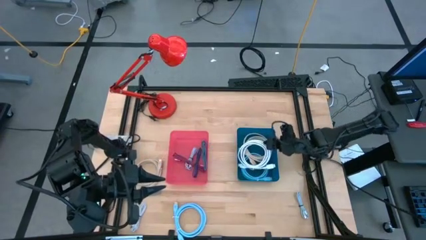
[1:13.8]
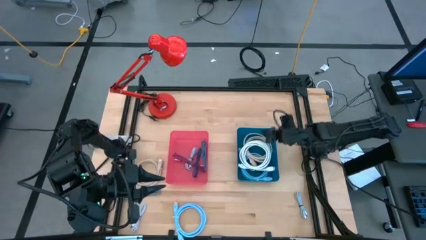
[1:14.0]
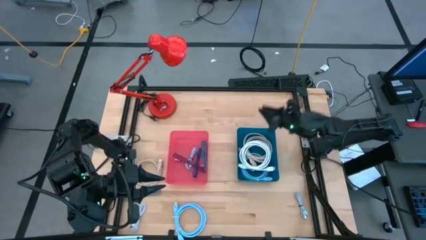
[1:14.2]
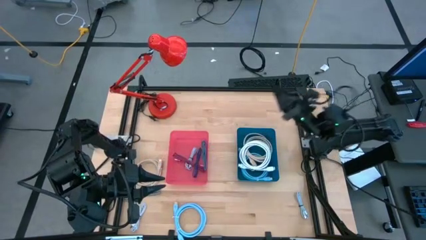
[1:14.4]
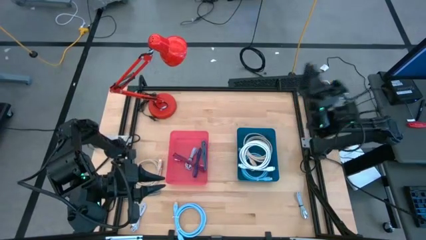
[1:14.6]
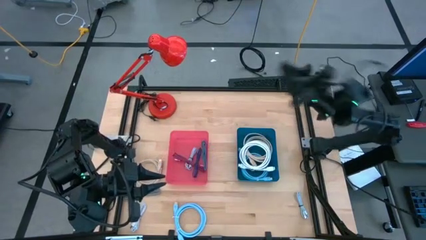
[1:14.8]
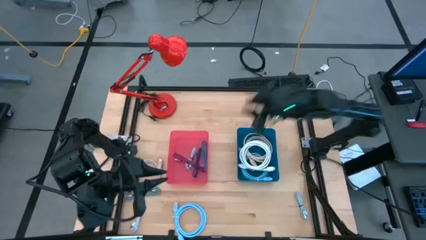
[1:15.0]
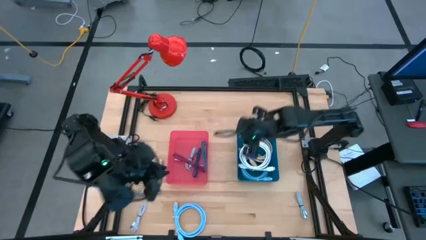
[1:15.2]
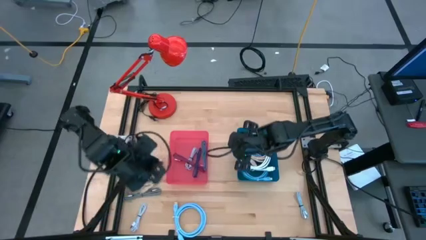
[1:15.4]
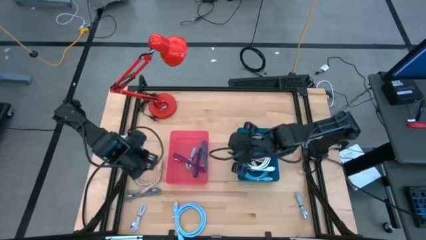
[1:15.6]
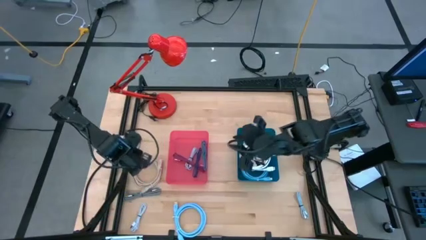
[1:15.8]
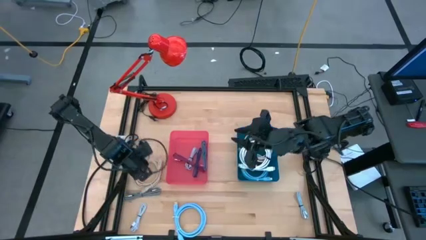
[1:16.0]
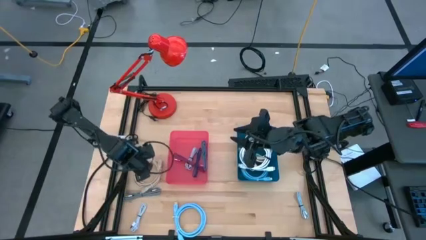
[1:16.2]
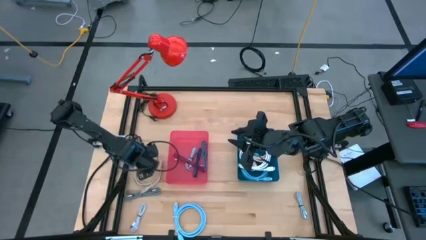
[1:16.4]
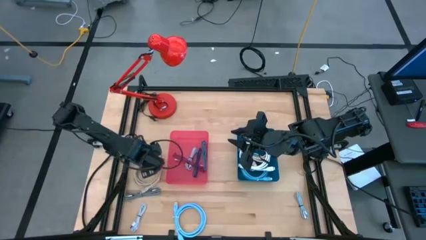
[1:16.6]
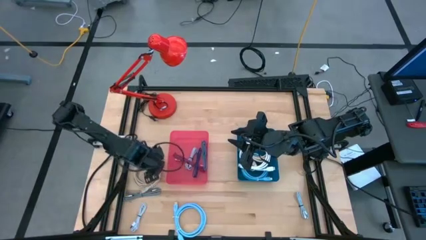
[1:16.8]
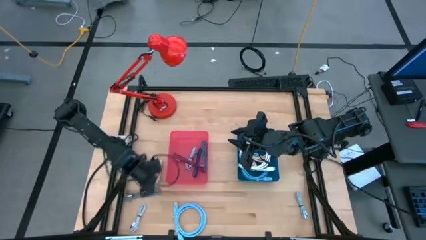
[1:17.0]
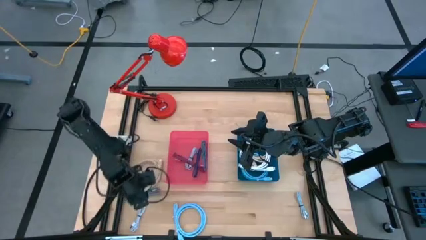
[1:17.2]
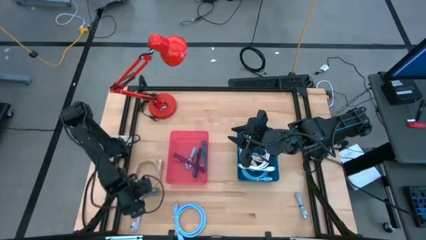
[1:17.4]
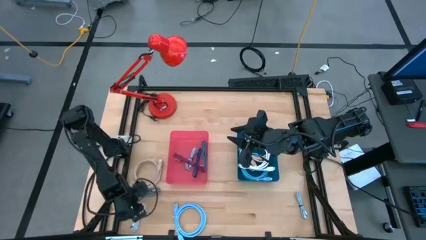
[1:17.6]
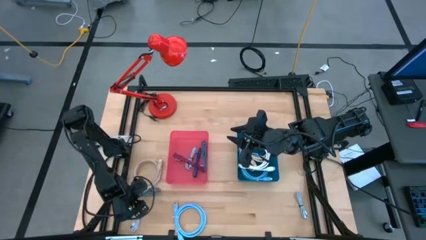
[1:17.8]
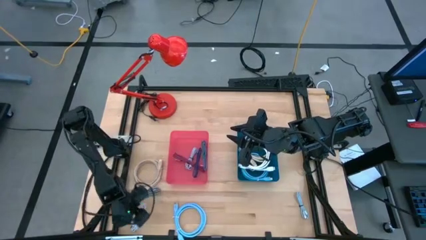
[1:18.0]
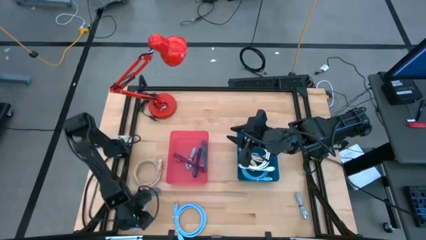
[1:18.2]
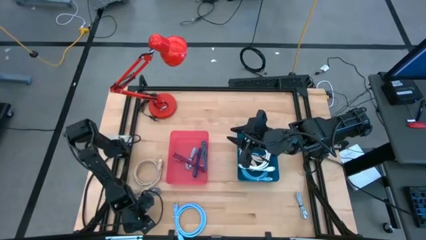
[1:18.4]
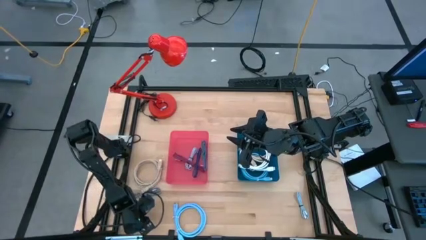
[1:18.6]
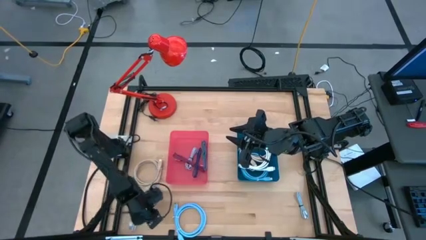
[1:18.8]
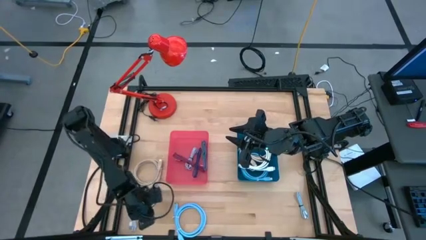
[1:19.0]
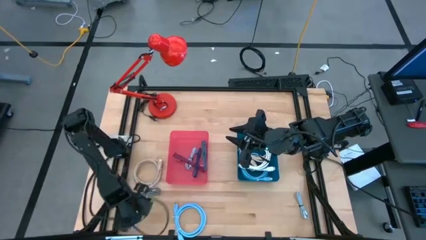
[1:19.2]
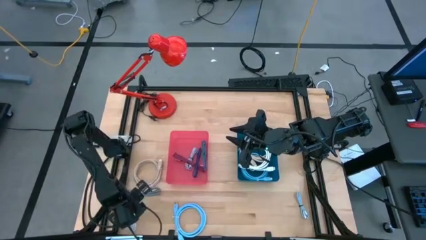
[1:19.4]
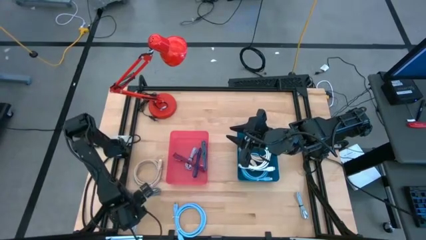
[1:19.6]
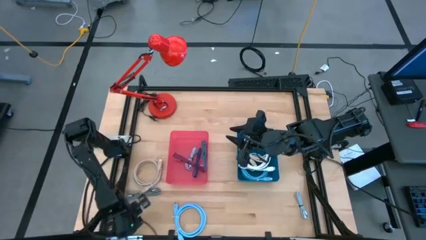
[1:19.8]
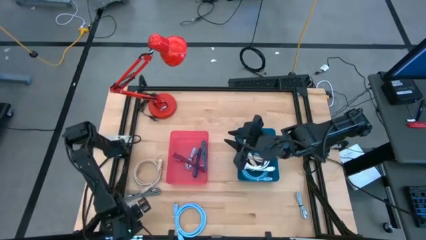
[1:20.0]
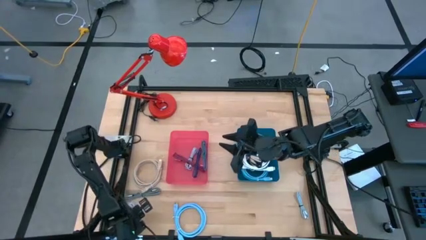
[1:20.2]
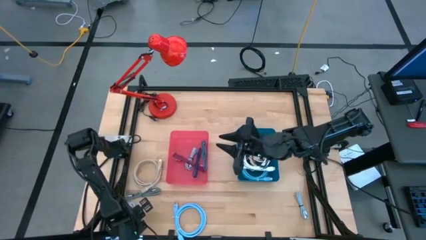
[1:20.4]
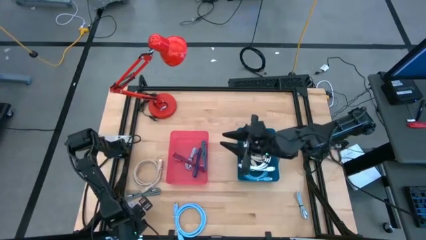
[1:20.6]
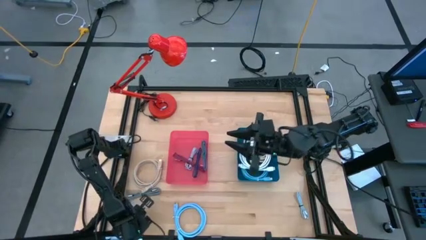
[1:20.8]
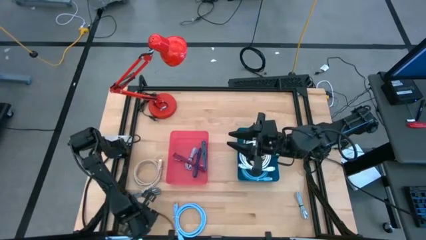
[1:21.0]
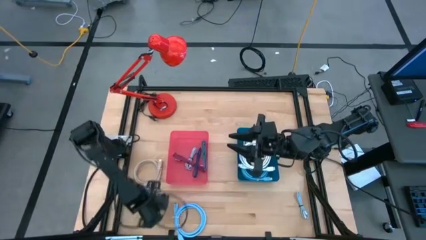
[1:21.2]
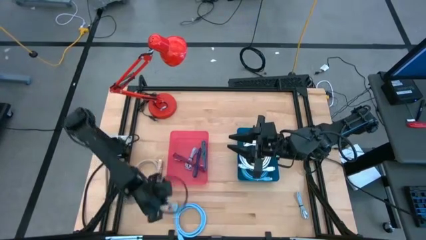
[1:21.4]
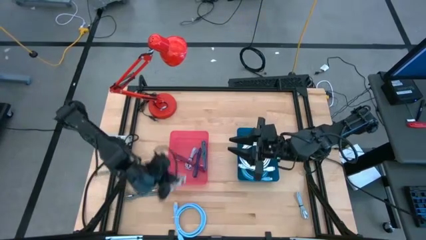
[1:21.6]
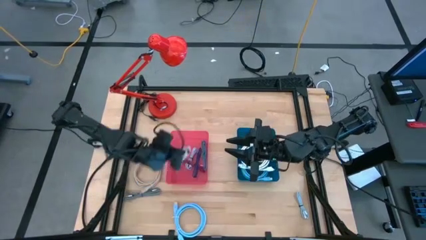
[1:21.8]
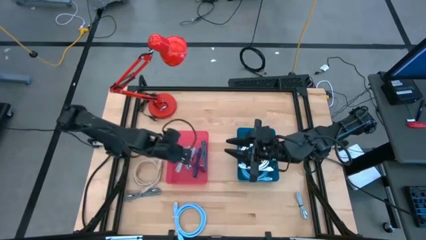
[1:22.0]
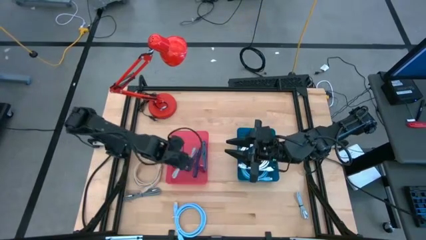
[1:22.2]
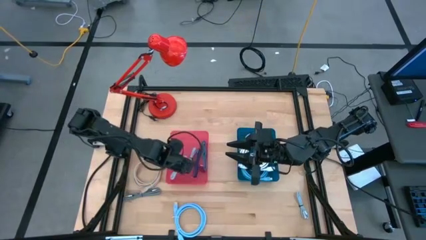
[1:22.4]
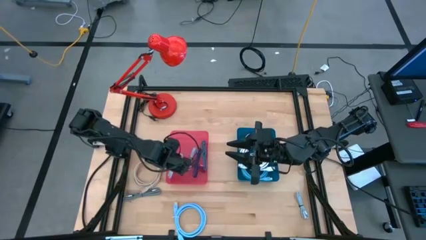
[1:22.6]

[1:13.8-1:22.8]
Task: Pick & Place USB Port
Put the left white charger cable into the red bin

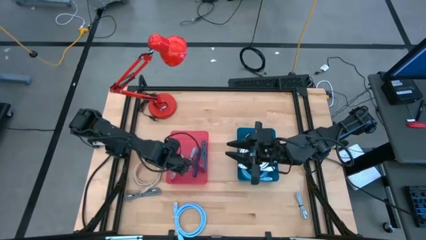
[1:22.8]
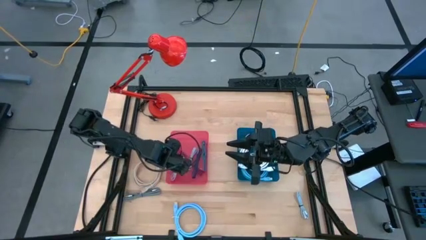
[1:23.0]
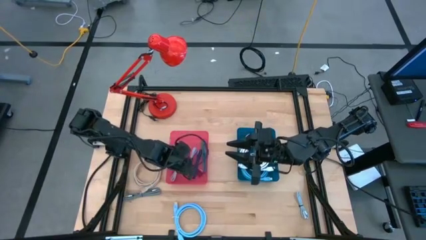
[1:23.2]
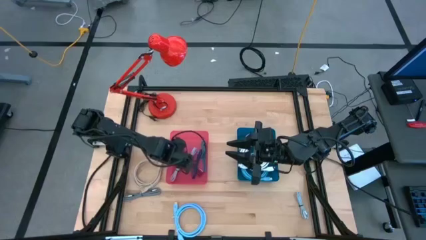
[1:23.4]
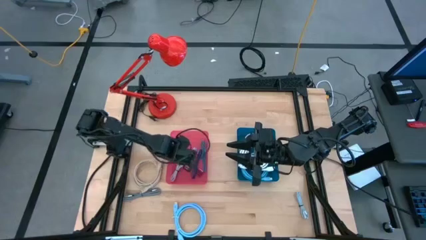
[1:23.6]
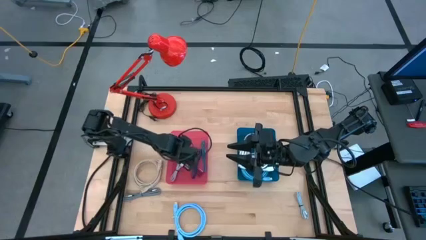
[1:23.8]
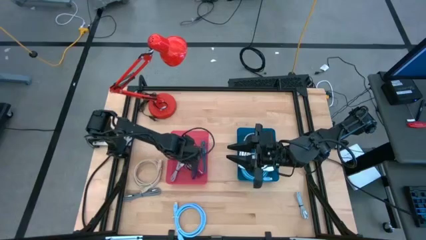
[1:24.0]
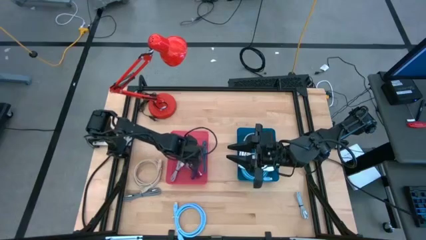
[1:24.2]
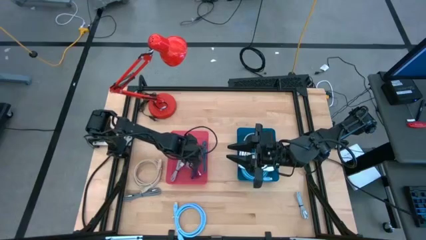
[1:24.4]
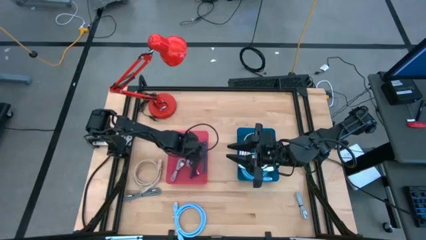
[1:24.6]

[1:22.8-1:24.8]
Adjust the black and pink charger cable in the red bin

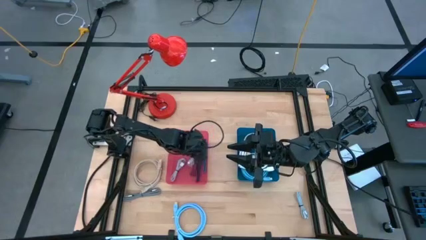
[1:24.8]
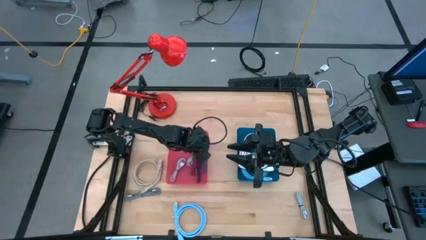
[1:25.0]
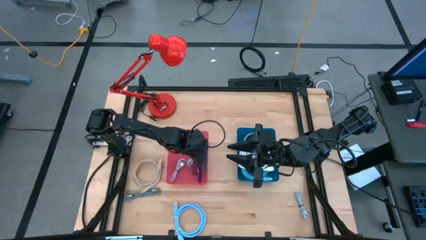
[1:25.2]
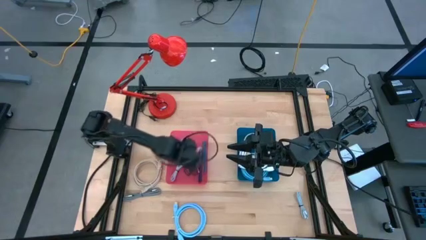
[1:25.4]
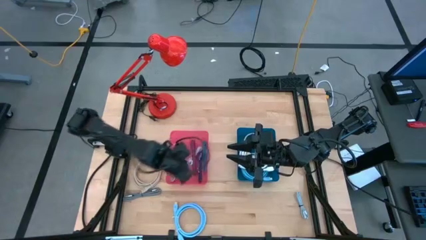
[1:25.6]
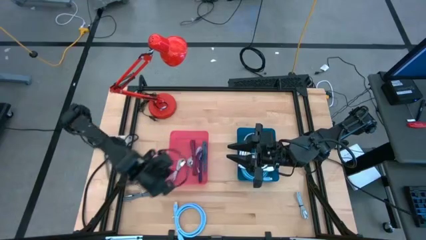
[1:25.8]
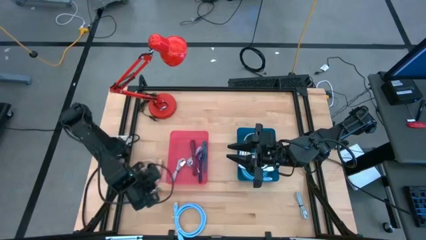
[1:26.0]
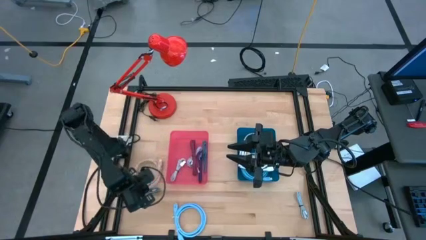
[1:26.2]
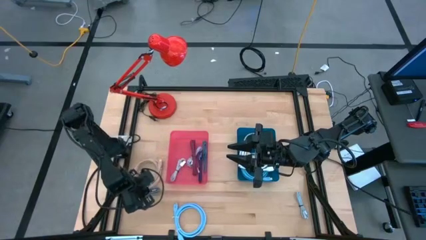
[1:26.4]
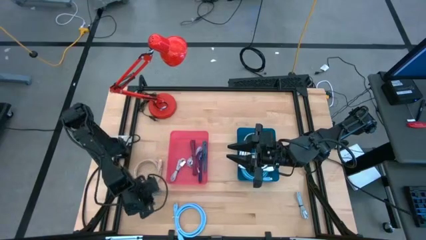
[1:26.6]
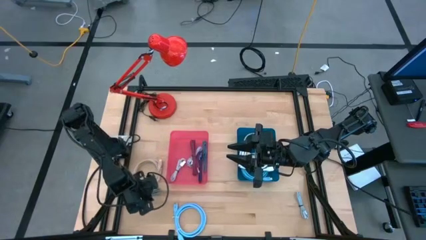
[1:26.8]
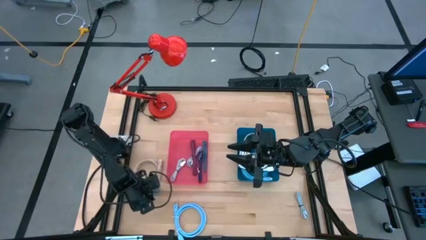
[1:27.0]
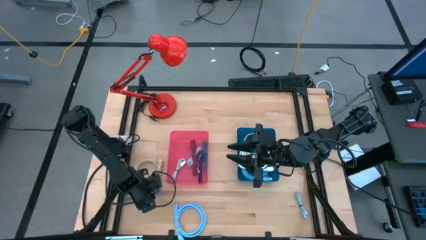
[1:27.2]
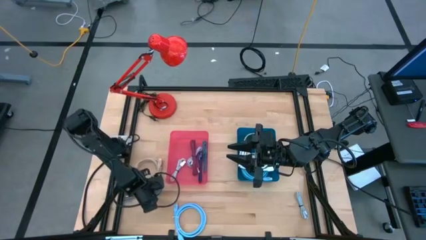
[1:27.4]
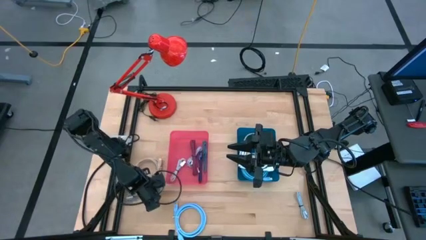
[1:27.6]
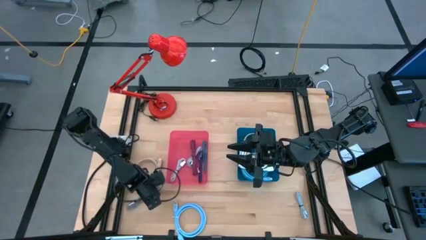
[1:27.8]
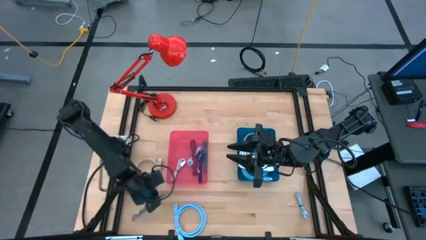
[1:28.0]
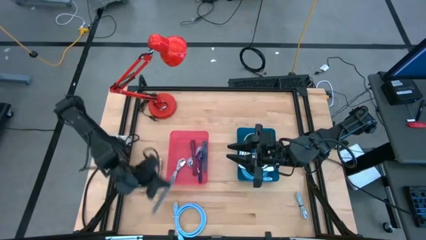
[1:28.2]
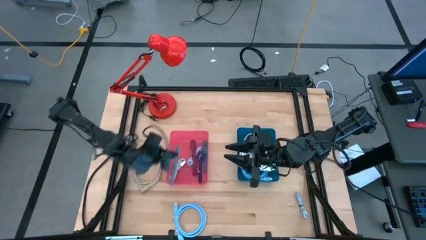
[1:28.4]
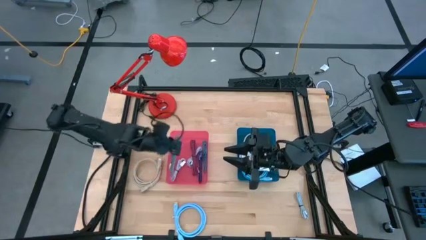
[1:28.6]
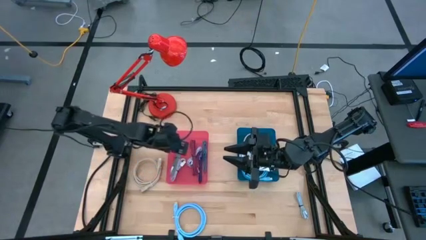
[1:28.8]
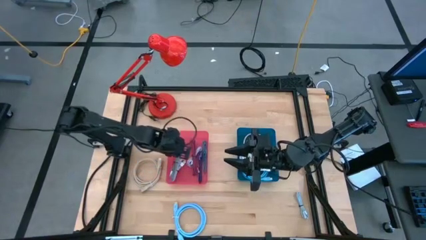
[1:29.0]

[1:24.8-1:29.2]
Put the black and white charger cable into the red bin

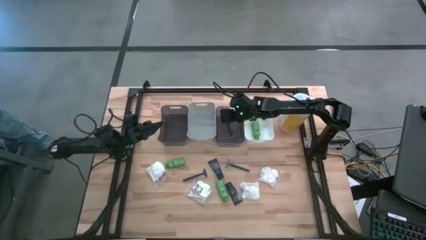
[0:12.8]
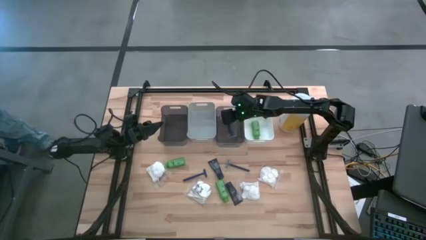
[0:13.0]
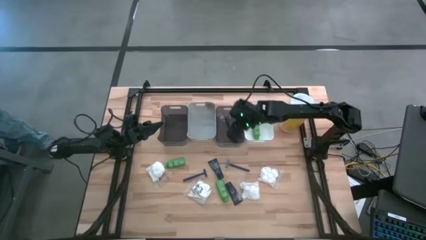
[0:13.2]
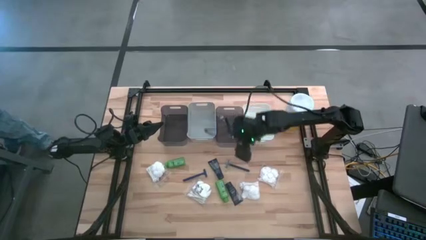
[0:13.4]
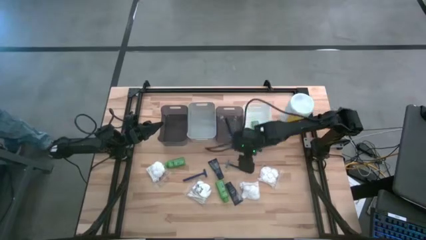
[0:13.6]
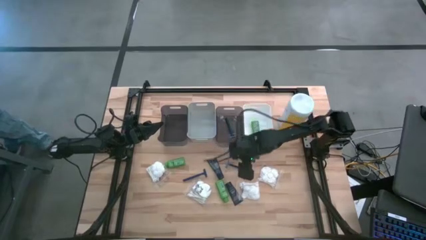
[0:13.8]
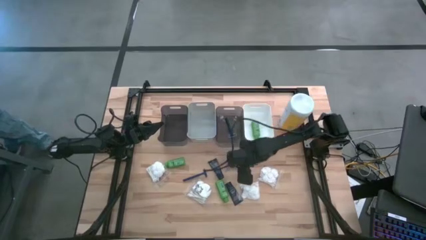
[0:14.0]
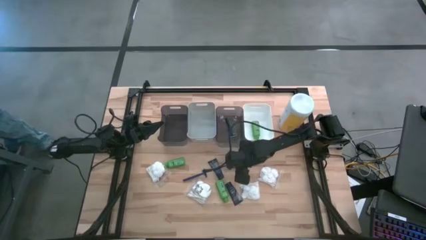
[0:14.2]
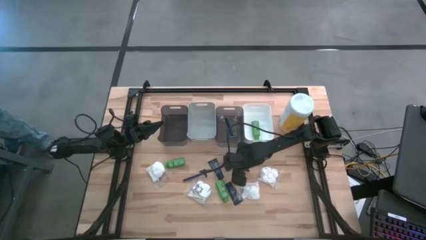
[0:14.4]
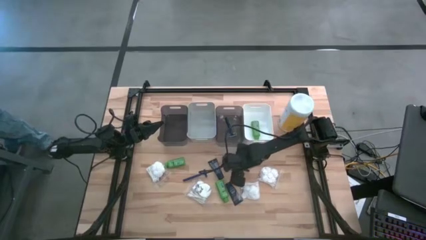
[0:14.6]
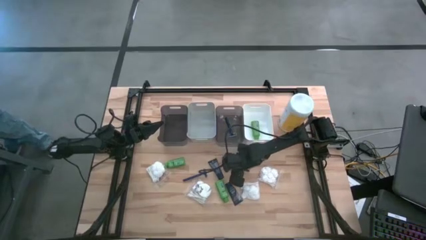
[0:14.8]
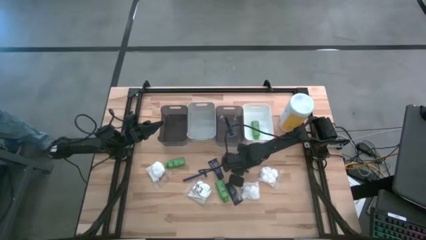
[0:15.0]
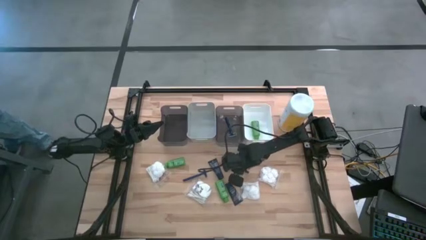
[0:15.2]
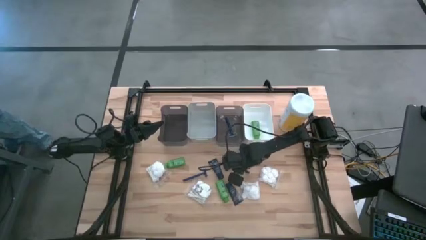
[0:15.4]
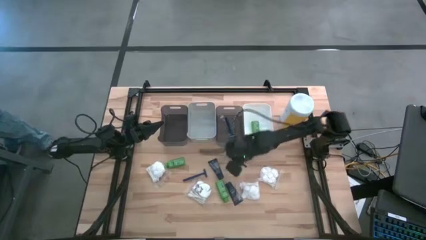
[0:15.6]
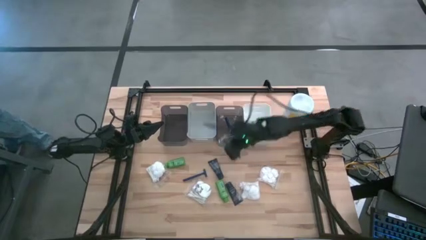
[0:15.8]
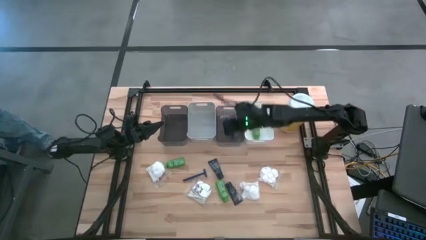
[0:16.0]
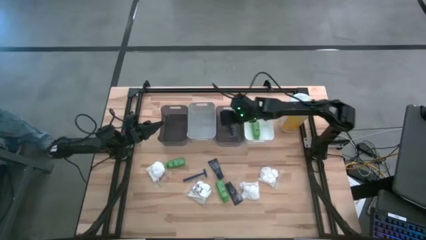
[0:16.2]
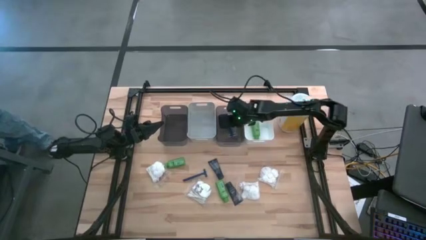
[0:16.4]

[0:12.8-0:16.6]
Task: Pick & Place Travel size toiletries
Put the blue razor into the right black bin
